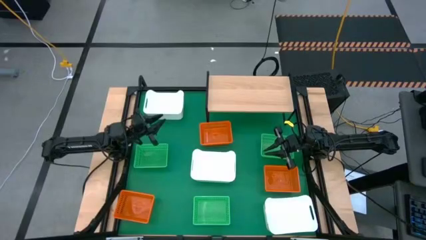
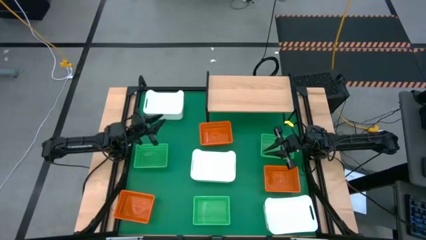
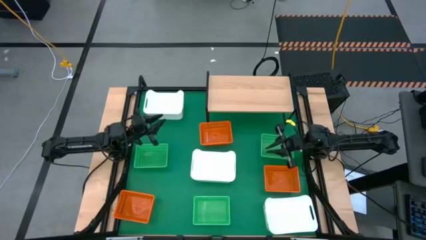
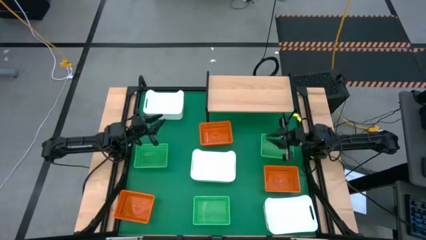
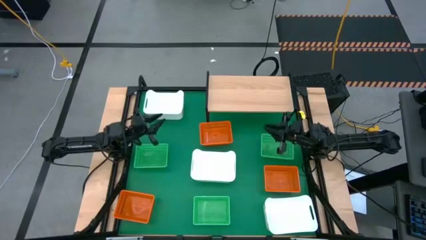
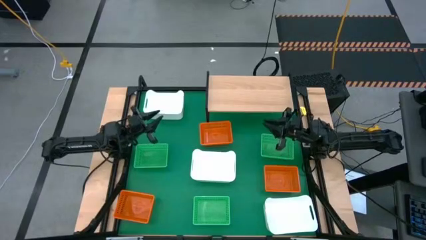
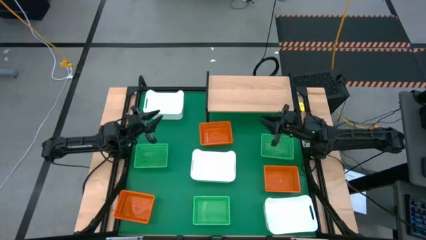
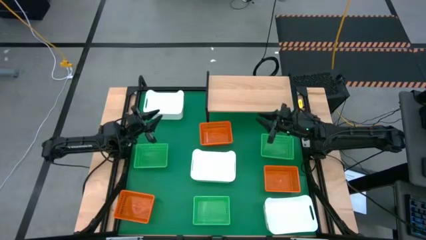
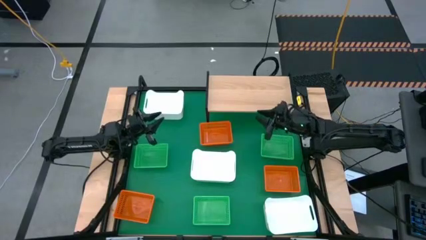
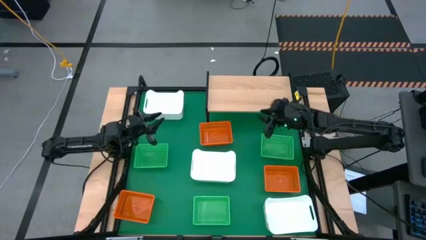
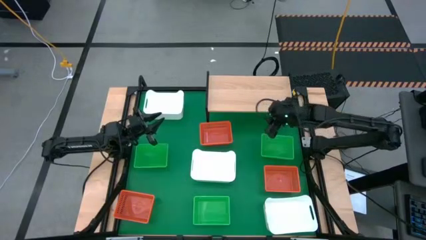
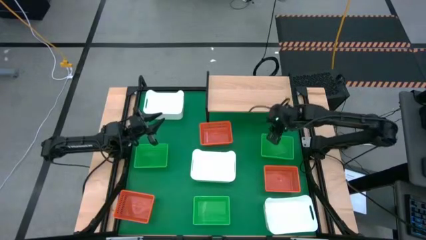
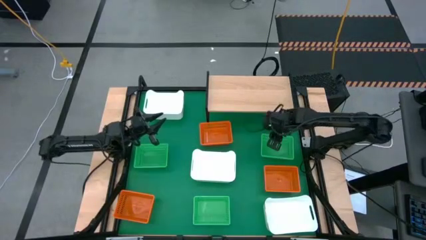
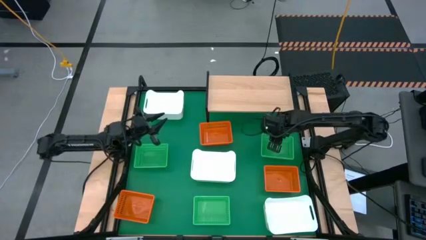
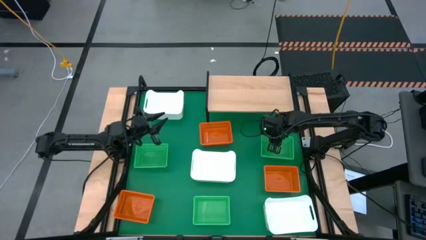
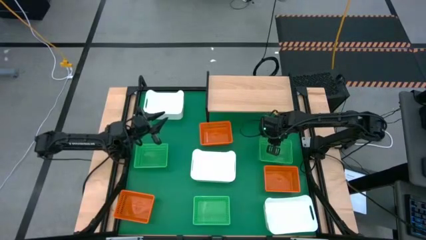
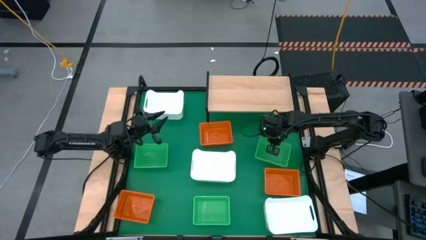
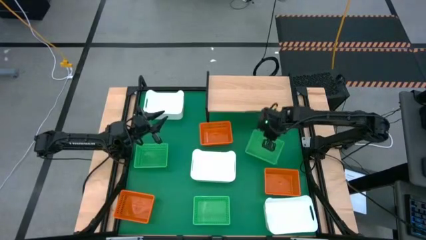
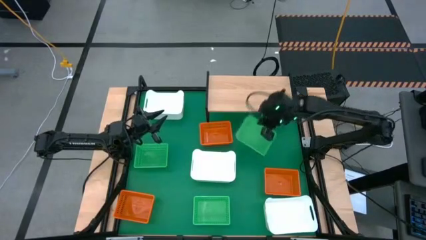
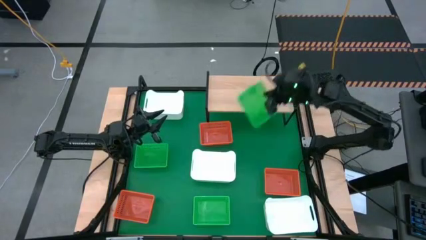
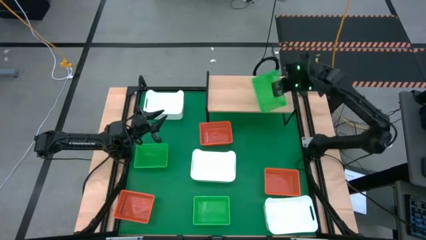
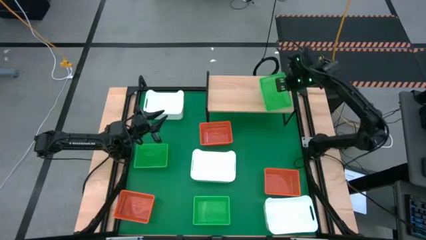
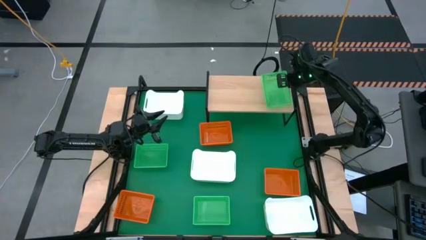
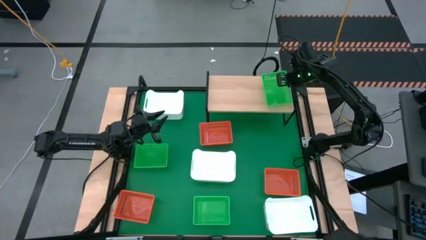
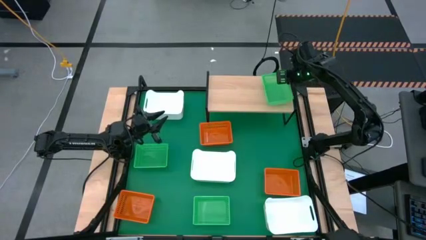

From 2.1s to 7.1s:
Task: Stack baskets on shelf by color
Put the top right green bin on the shelf

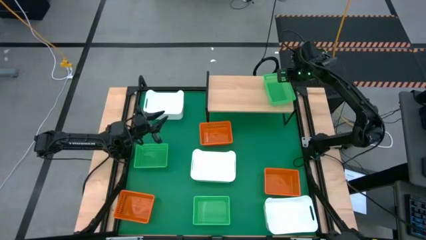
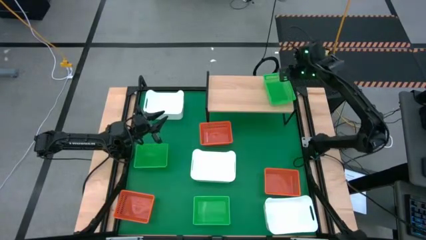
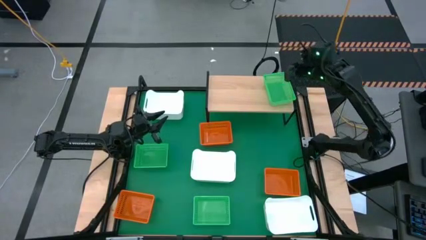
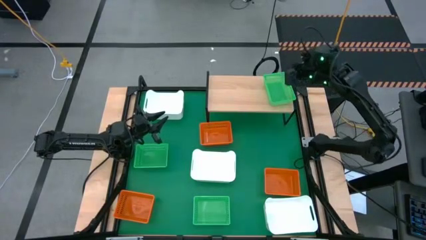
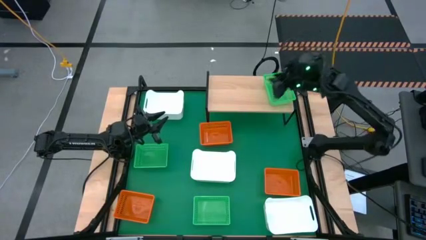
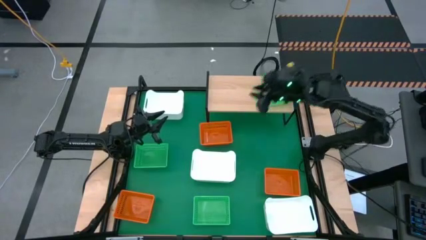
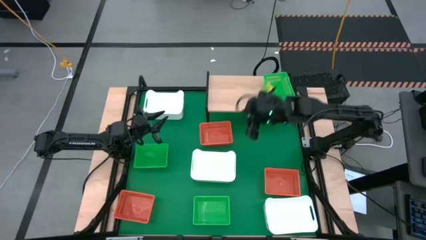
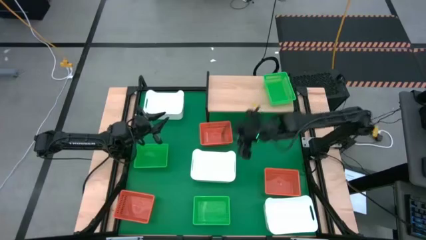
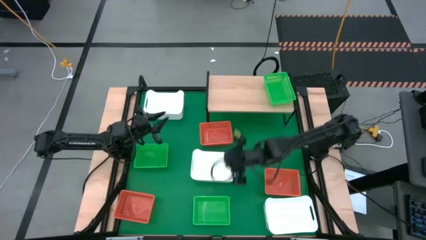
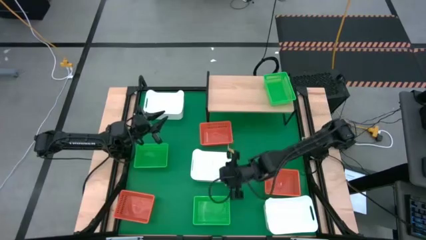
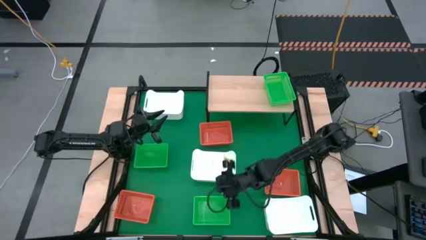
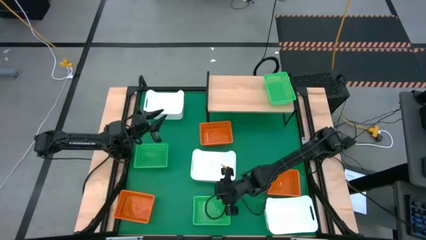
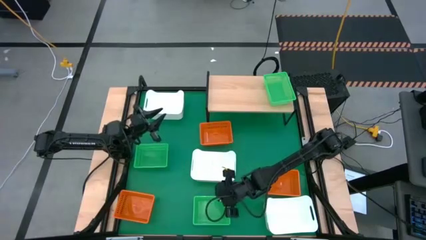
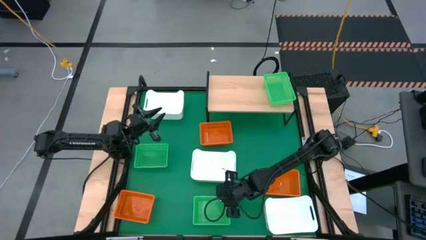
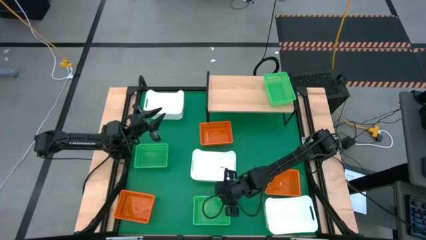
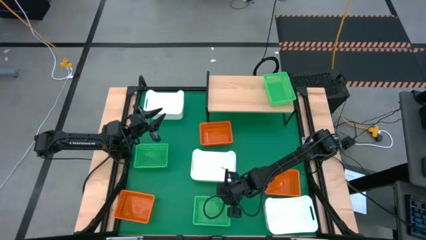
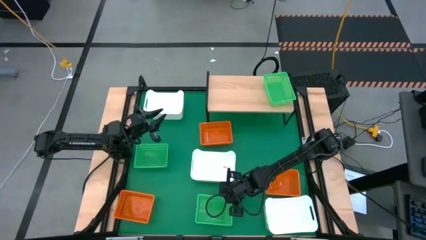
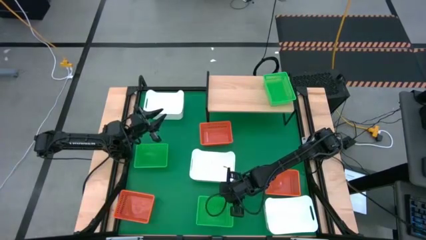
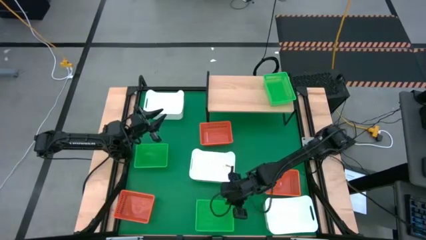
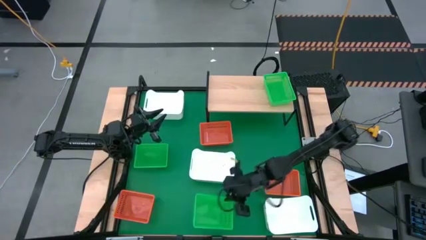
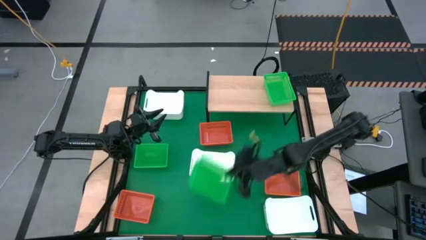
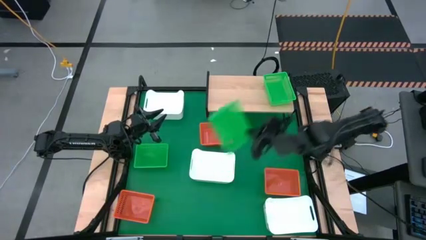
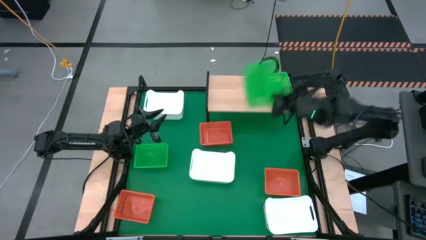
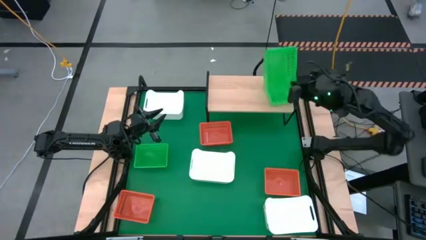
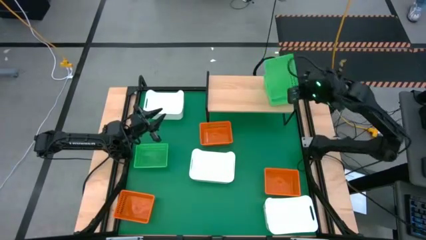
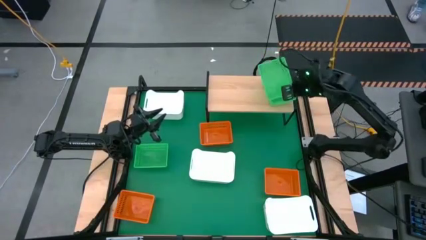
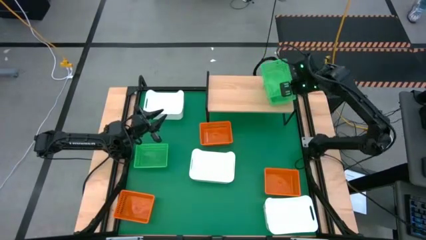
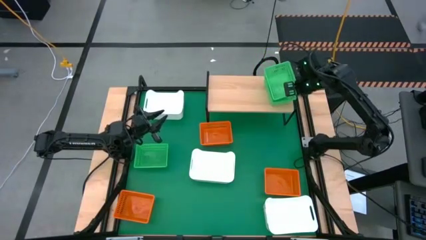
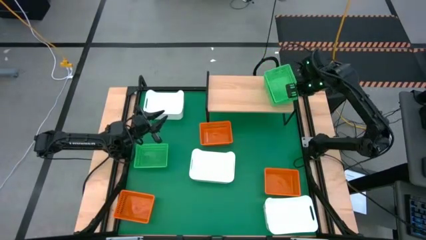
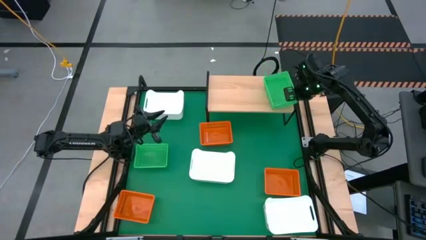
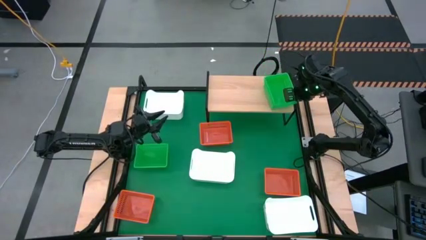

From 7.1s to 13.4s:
Stack the bottom green bin on top of the green bin on the shelf

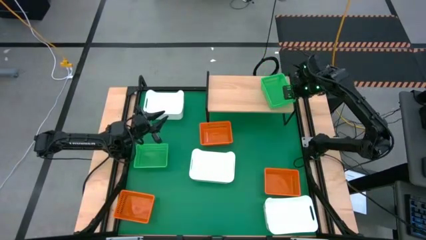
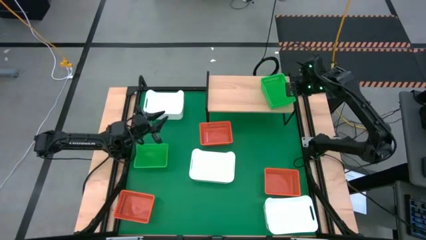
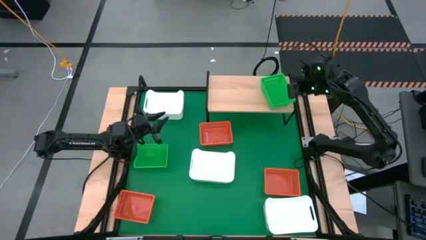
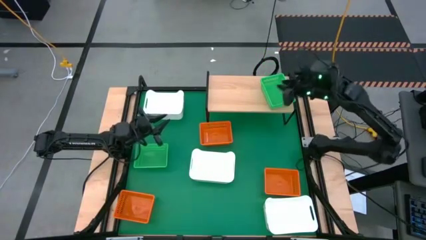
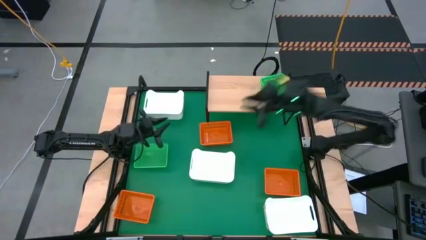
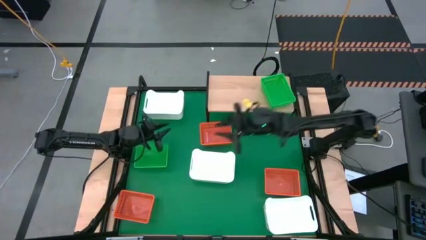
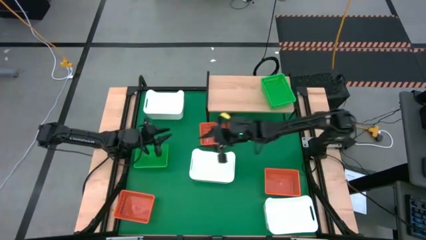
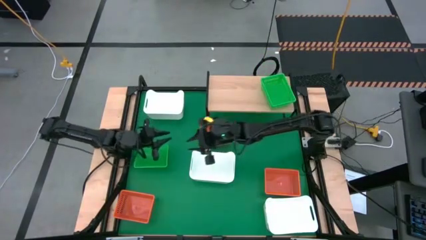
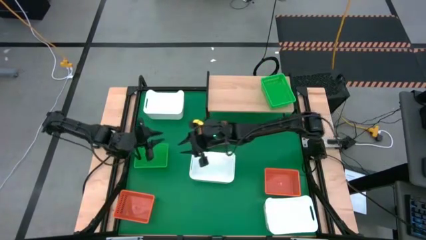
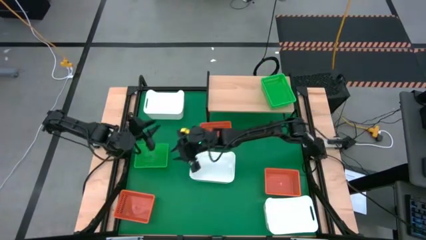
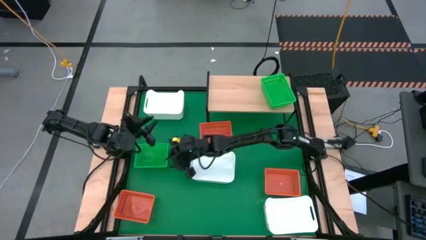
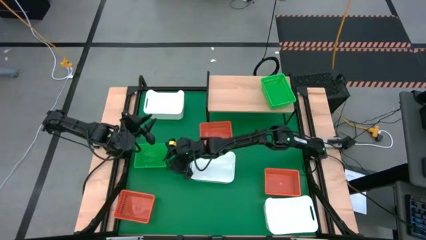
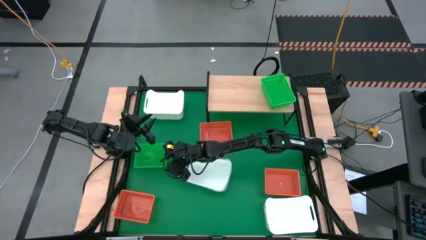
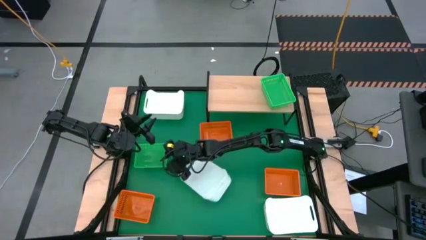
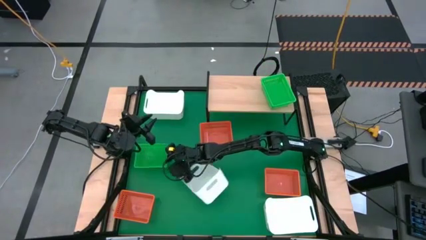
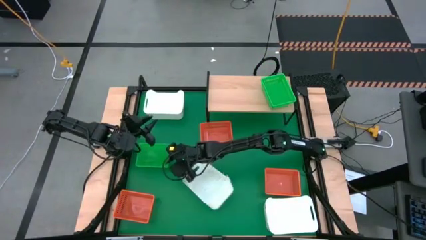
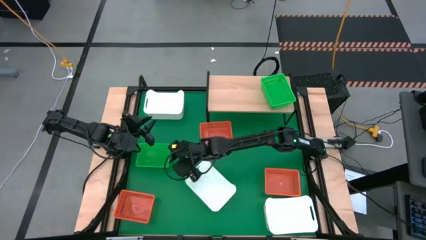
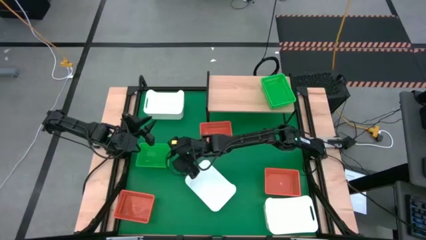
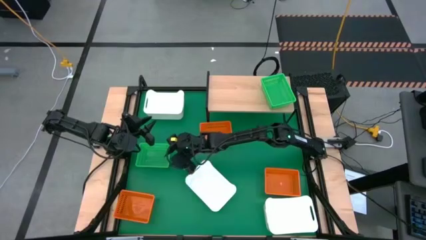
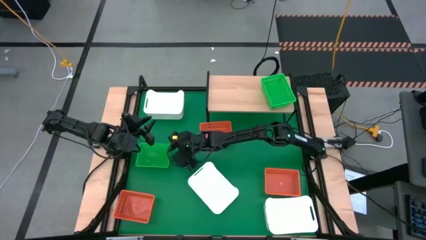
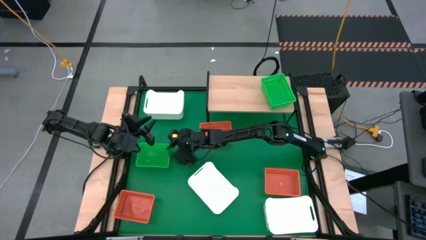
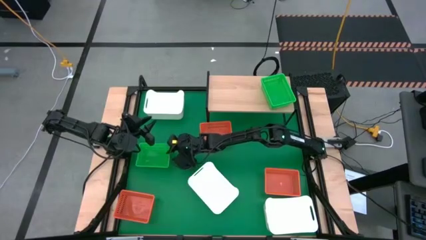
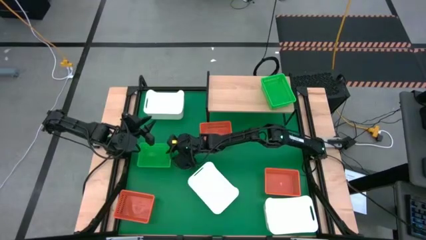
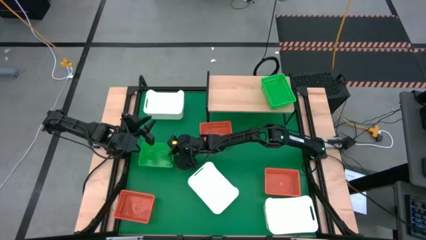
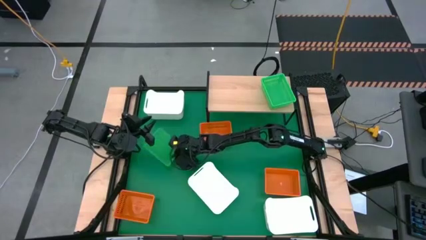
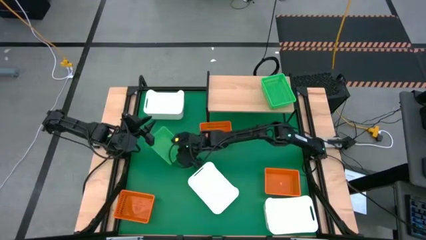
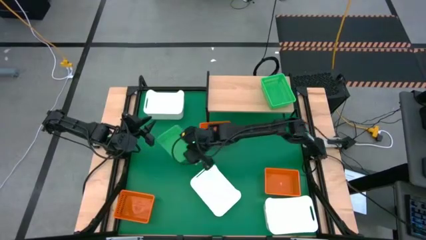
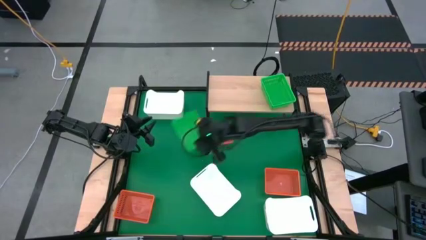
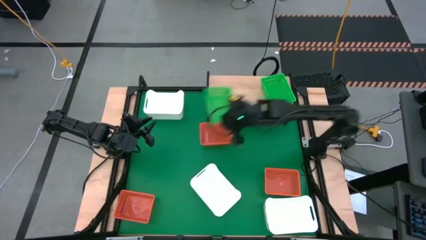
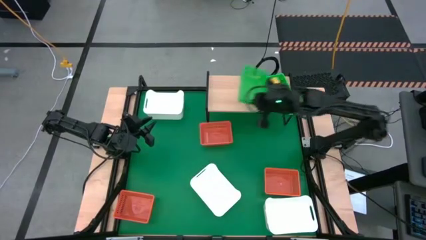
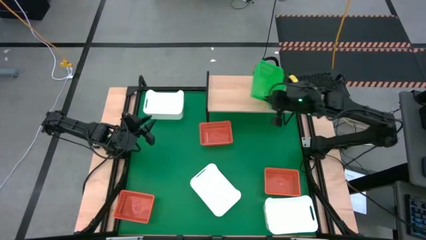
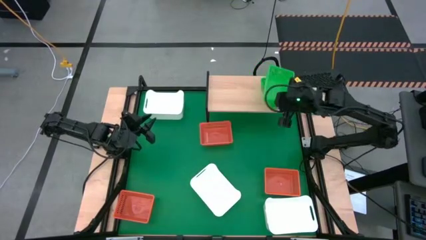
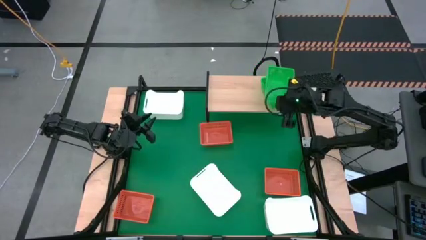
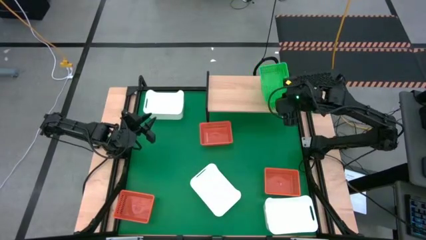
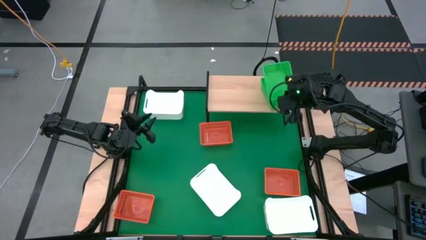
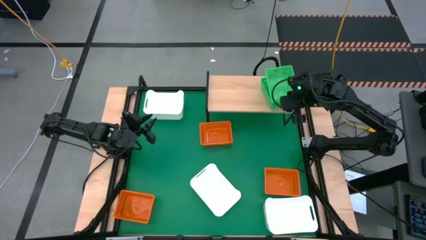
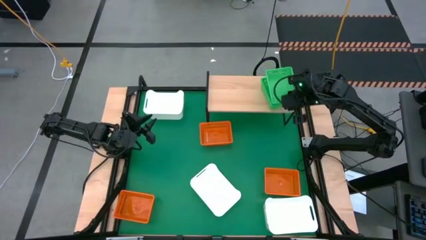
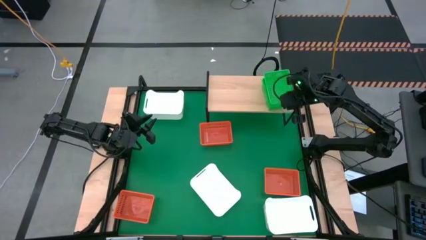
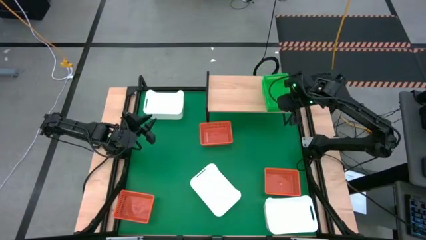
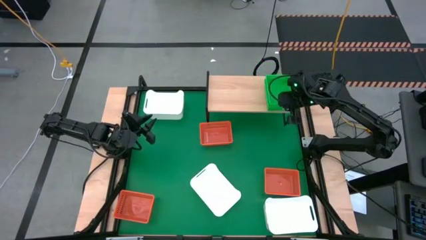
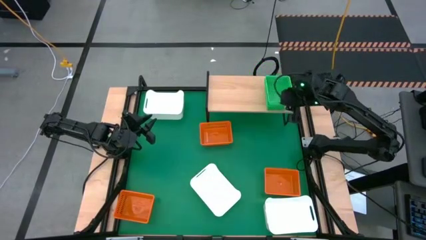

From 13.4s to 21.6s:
Stack the green bin on top of the green bin on the shelf
